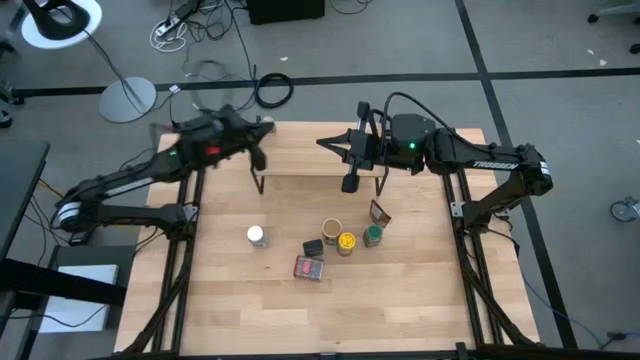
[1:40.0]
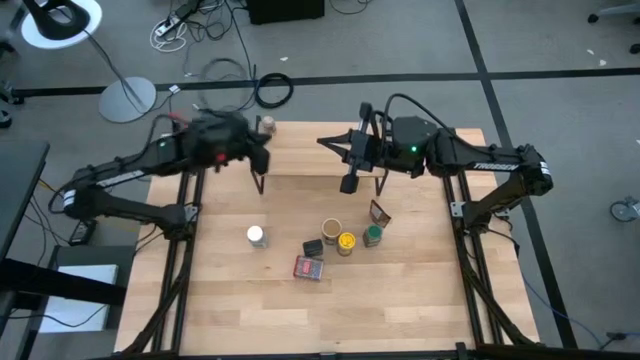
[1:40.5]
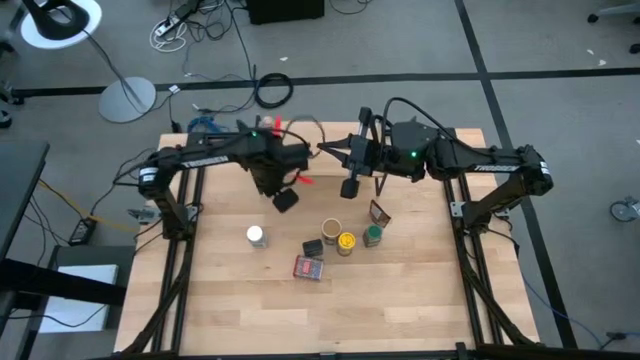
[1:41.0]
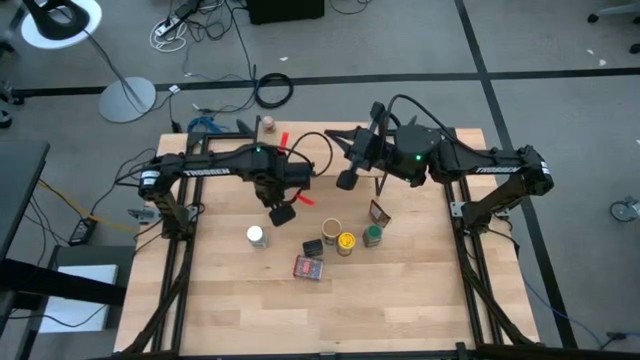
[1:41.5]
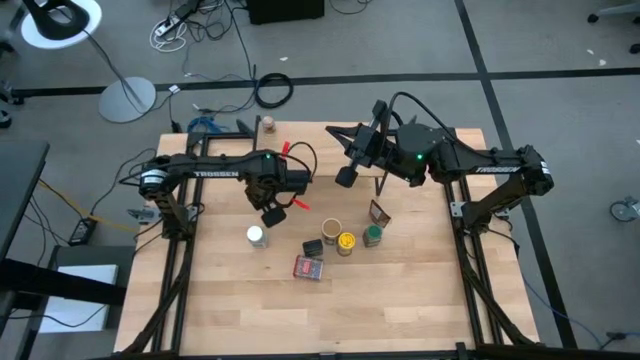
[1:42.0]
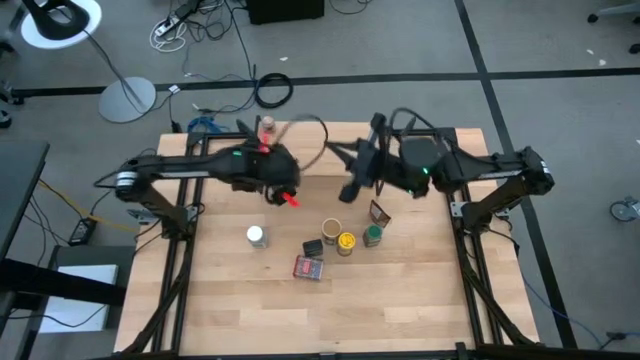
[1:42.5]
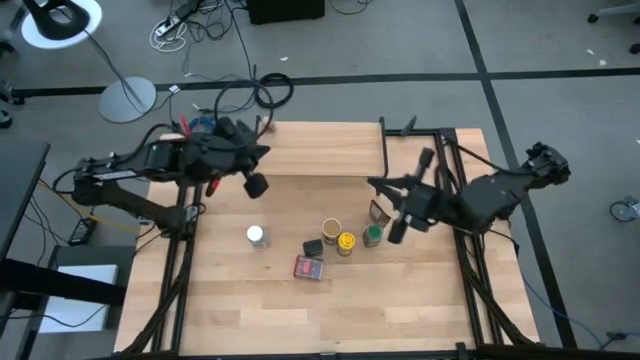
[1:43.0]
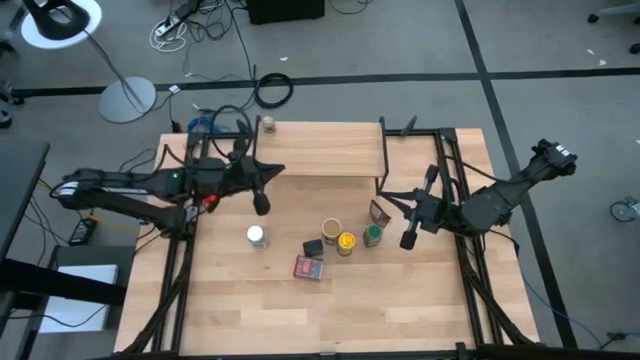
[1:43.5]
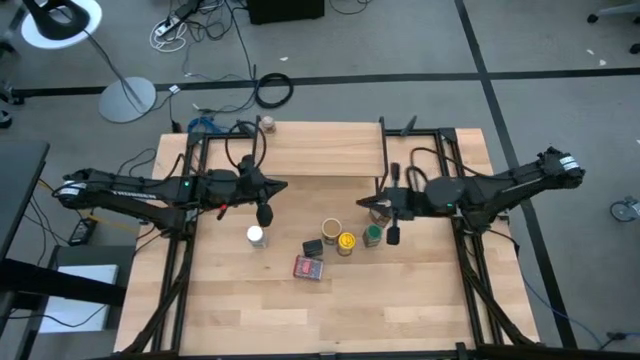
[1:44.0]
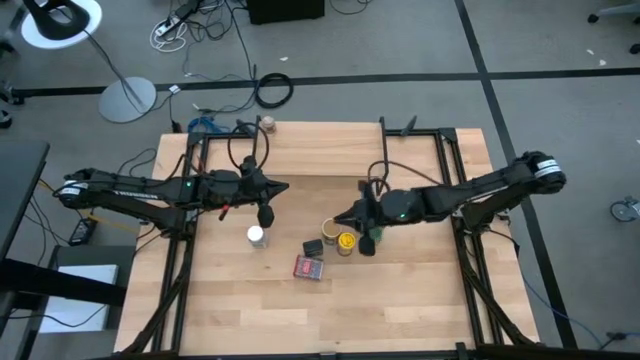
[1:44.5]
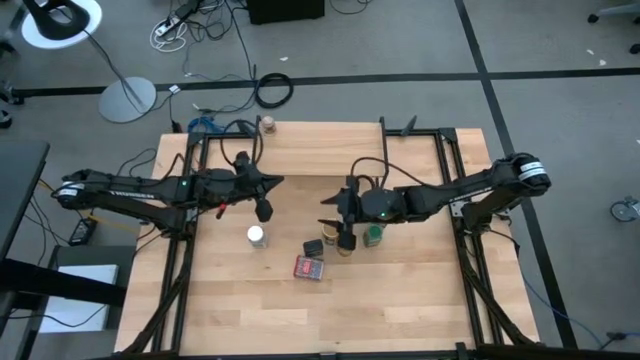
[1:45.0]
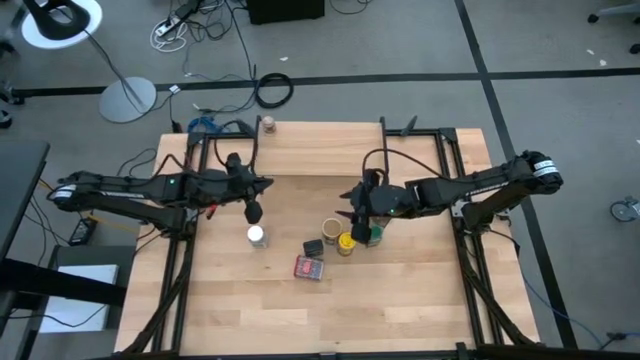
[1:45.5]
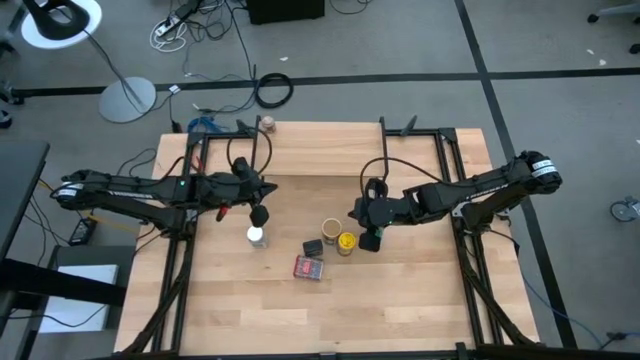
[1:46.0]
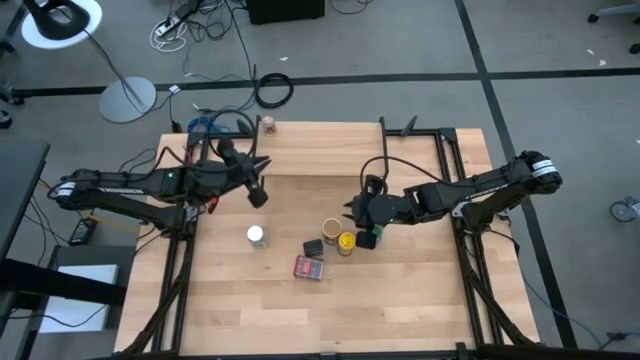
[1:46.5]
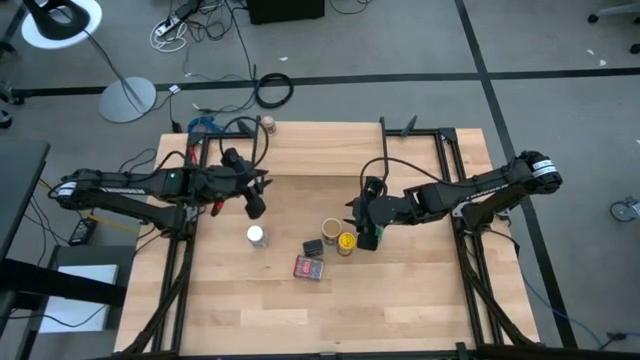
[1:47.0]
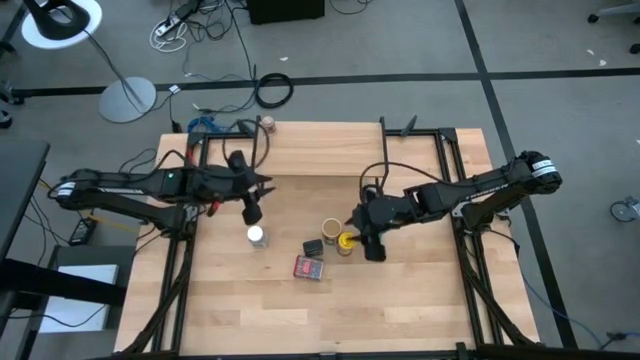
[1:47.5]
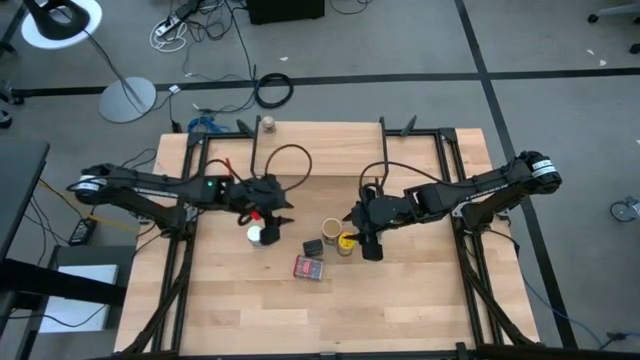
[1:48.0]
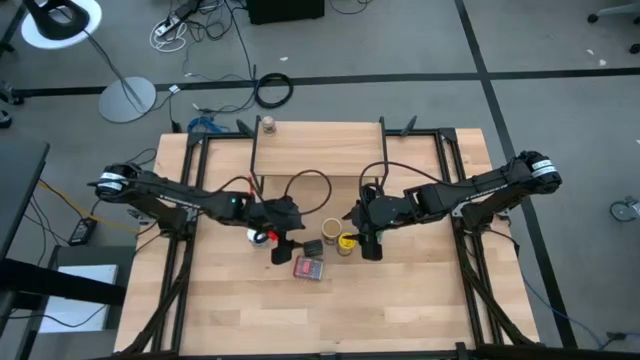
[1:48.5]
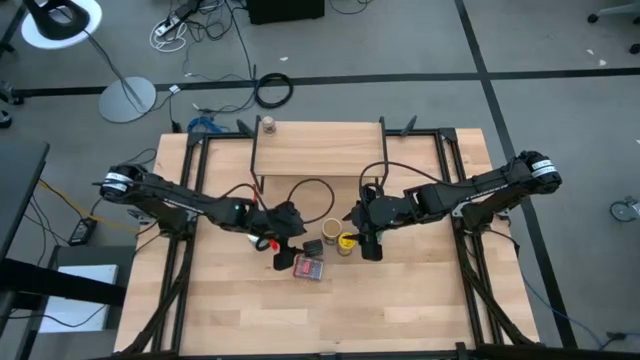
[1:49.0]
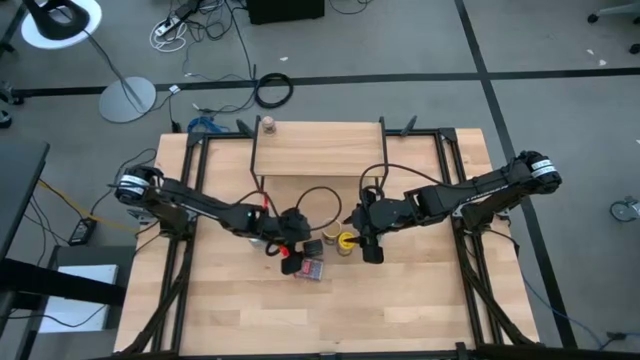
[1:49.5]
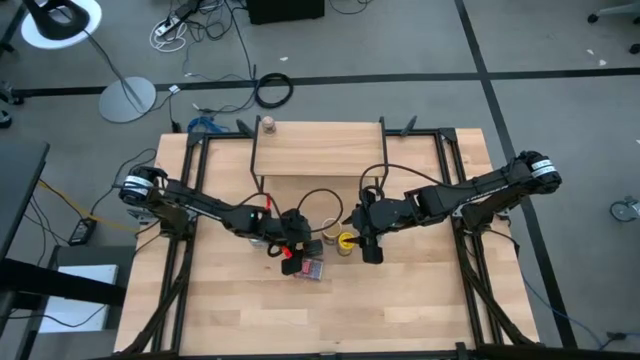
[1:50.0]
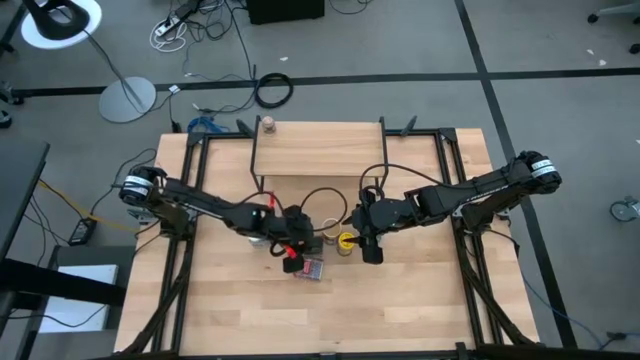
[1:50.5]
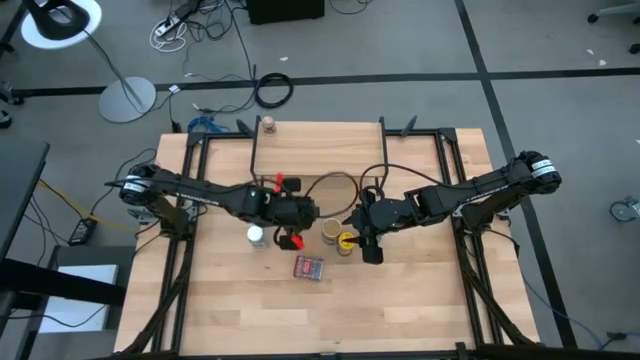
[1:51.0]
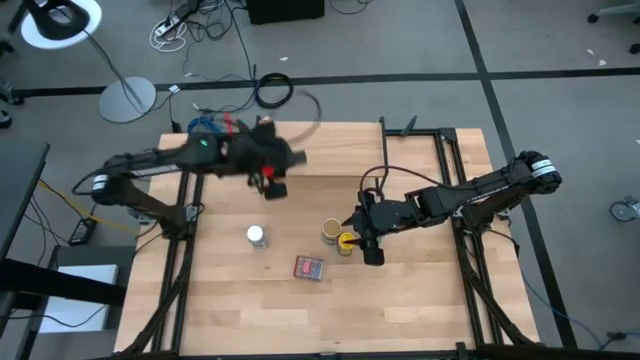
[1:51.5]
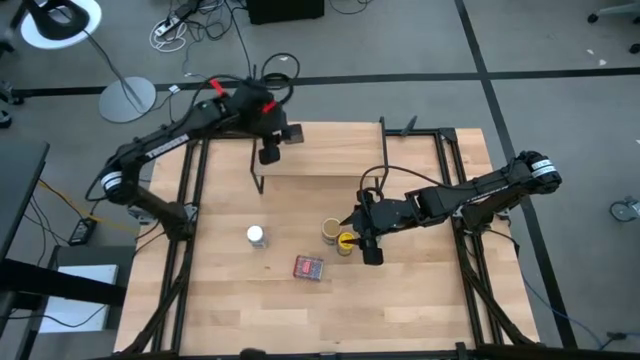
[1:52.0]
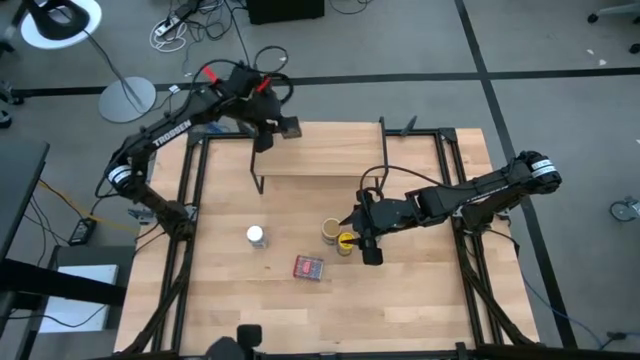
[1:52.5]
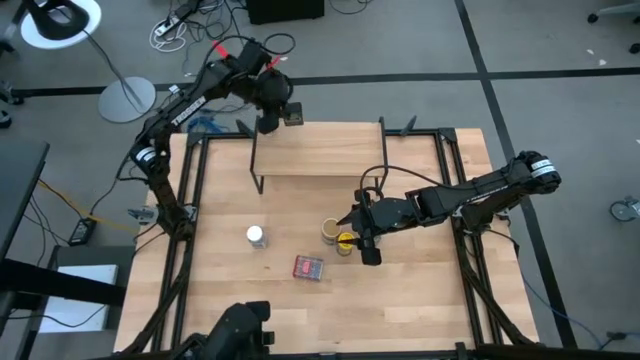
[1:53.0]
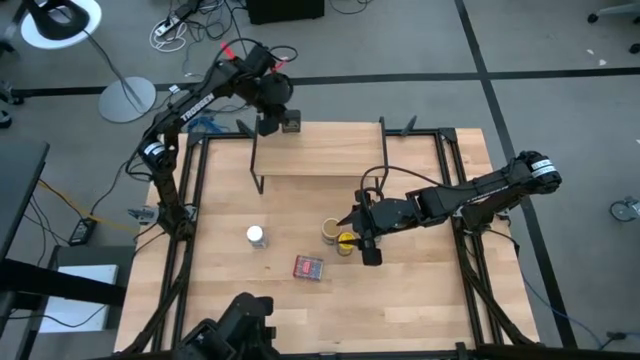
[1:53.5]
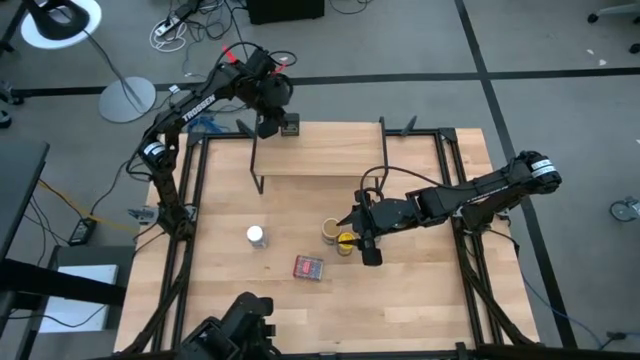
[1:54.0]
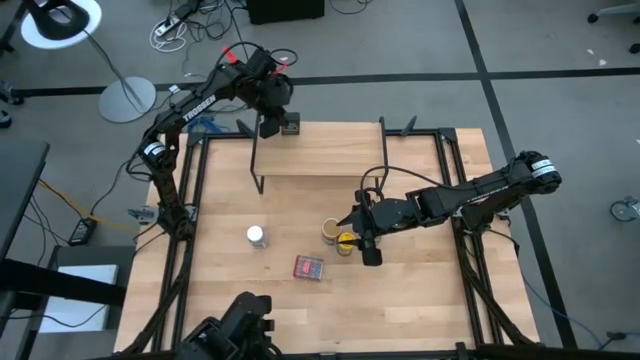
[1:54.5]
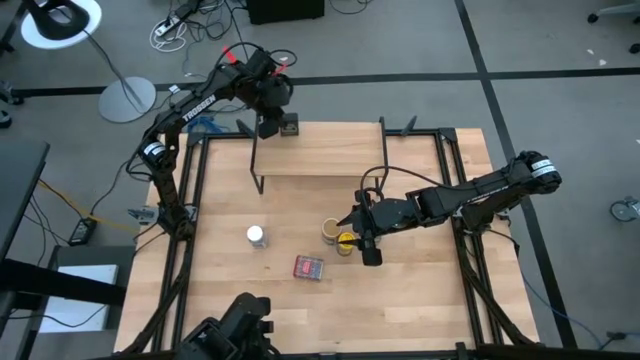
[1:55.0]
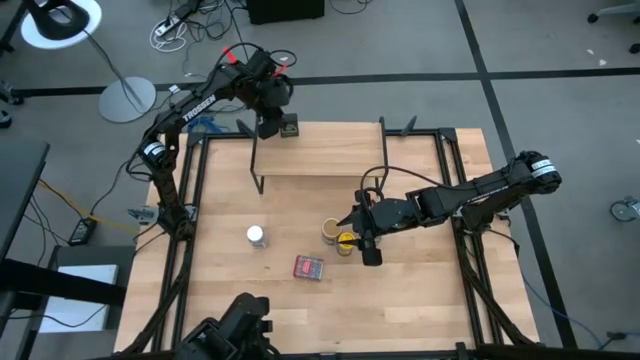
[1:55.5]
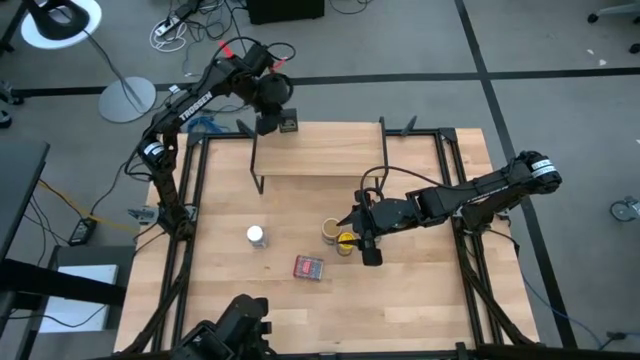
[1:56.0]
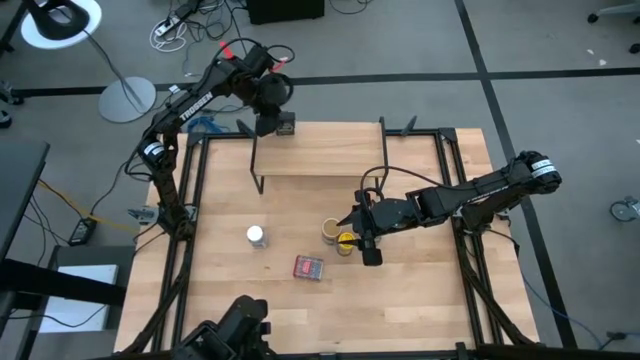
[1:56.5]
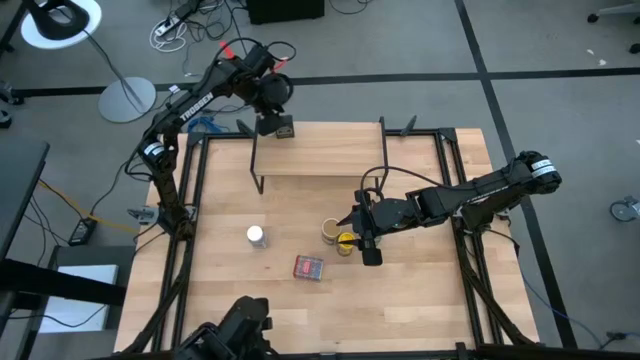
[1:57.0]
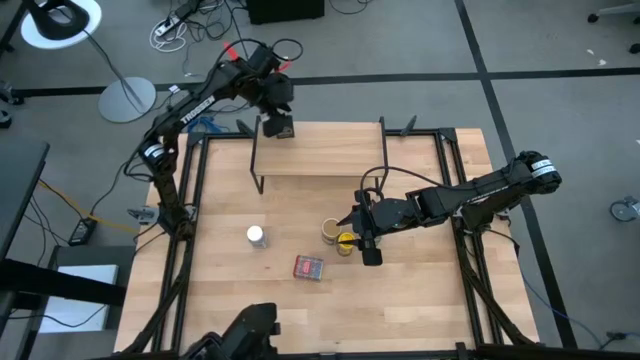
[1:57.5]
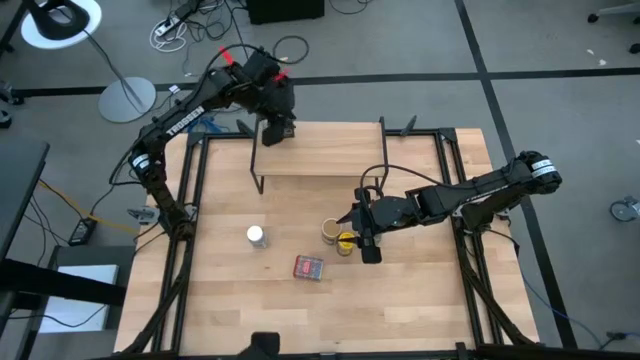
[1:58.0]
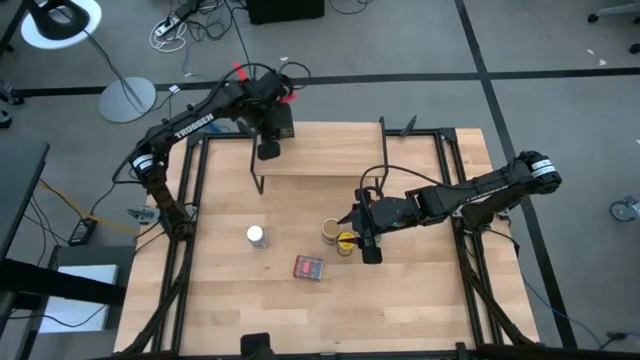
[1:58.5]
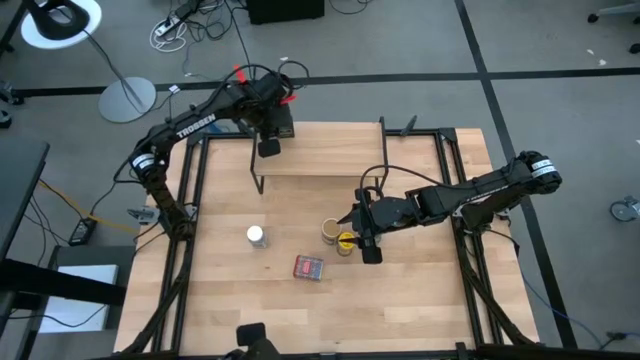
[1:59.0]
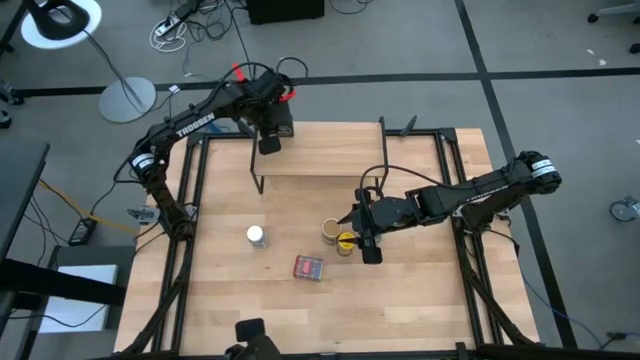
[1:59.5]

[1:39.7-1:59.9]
Task: Shelf spices
Put the black seasoning can on the shelf

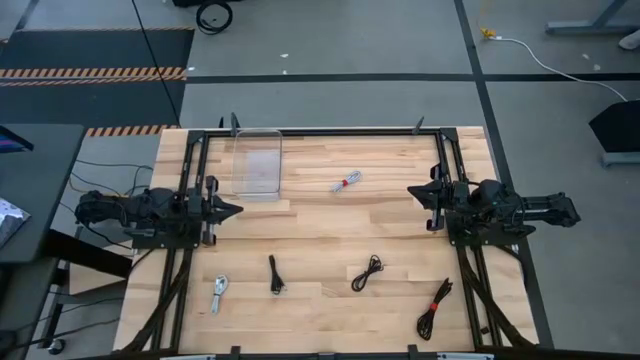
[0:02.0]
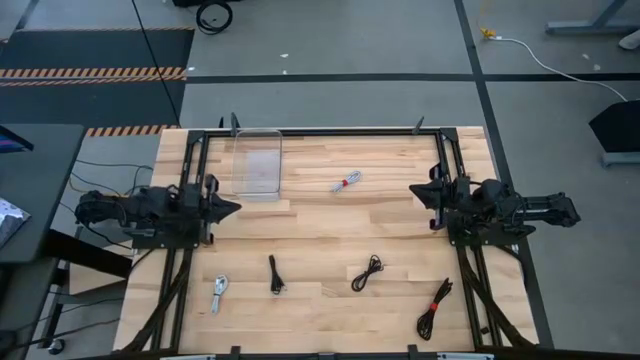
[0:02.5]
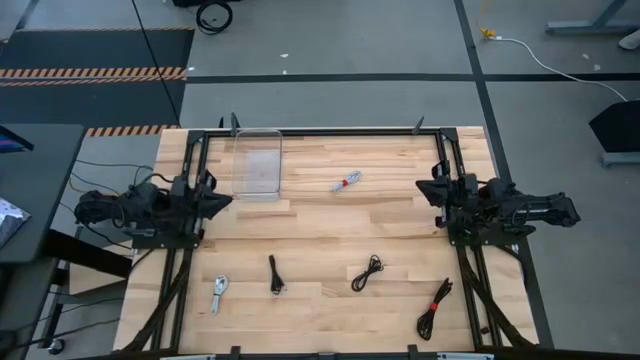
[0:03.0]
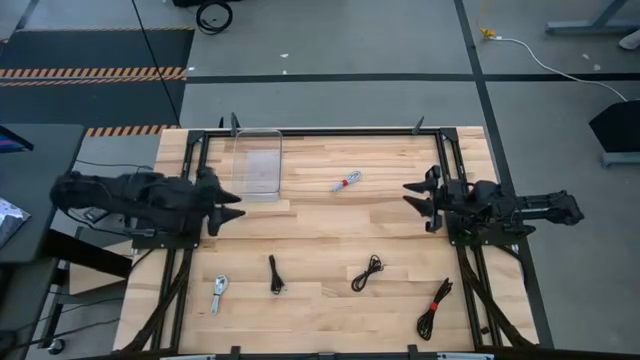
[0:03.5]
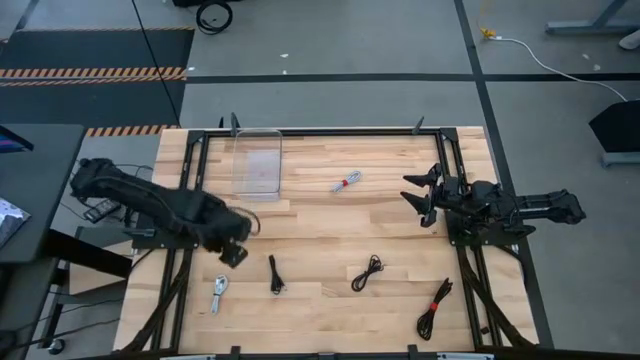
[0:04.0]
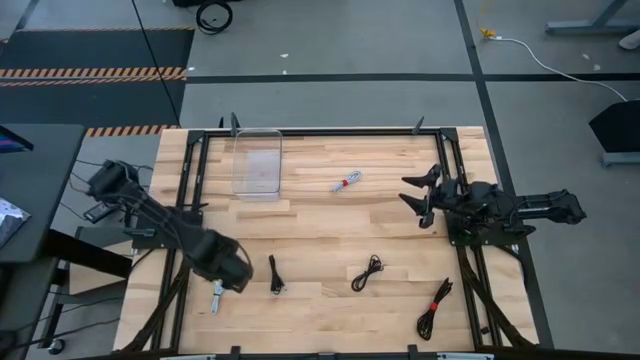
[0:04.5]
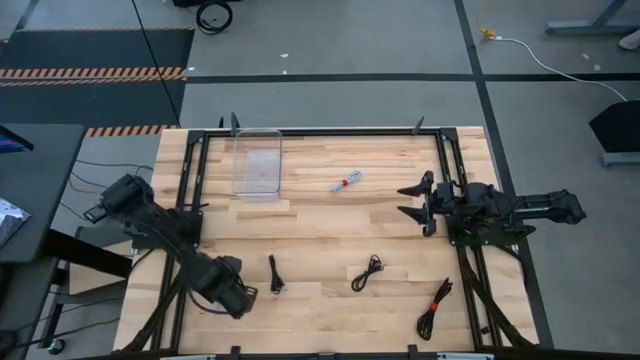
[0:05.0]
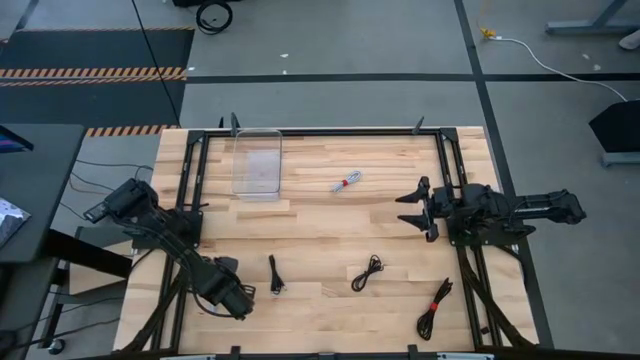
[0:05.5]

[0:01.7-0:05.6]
Task: Pick and place USB-C Cables
Adjust the bottom white charger cable
